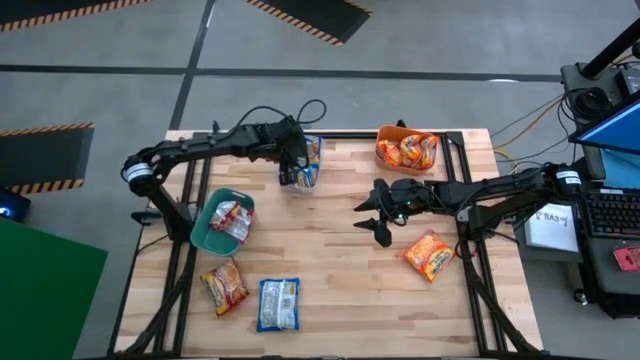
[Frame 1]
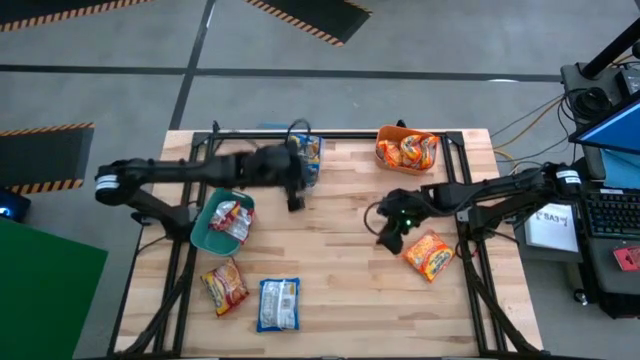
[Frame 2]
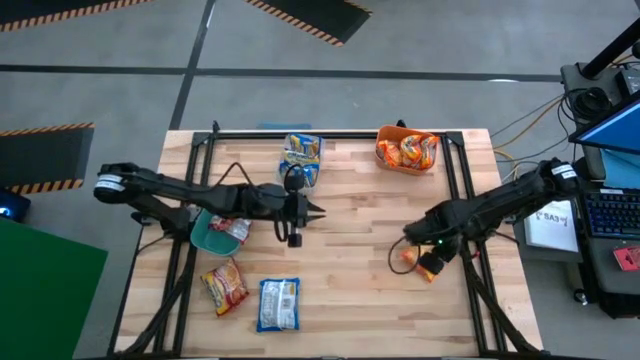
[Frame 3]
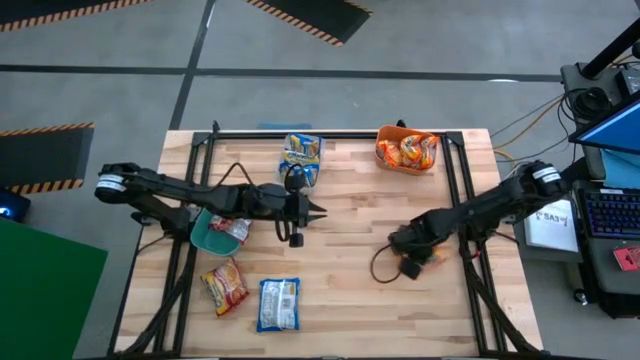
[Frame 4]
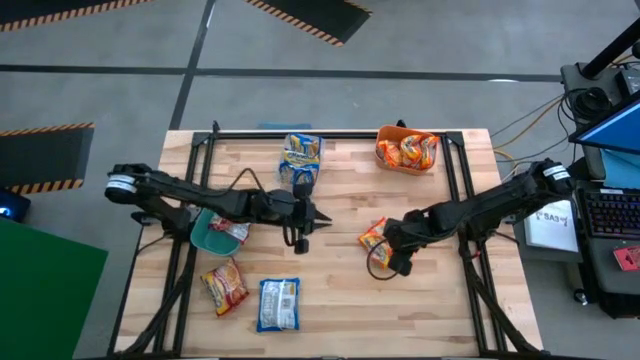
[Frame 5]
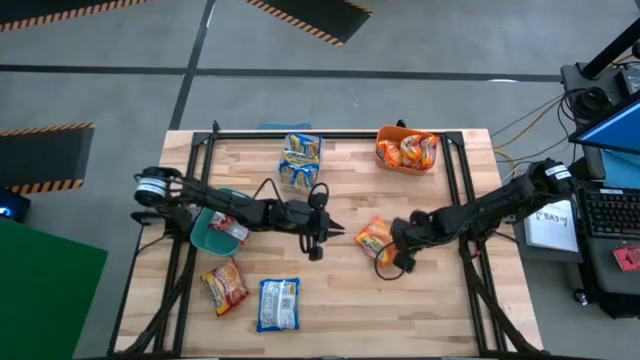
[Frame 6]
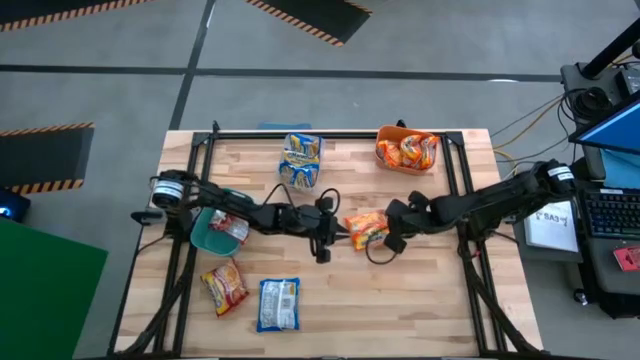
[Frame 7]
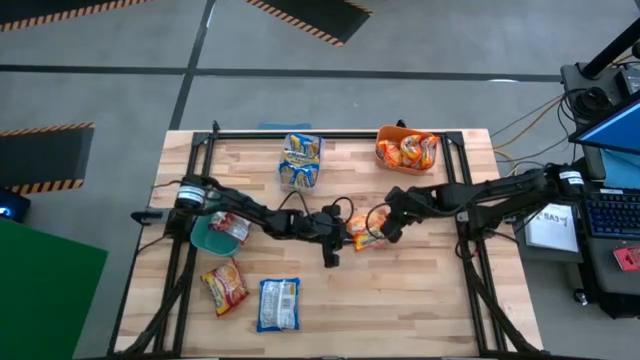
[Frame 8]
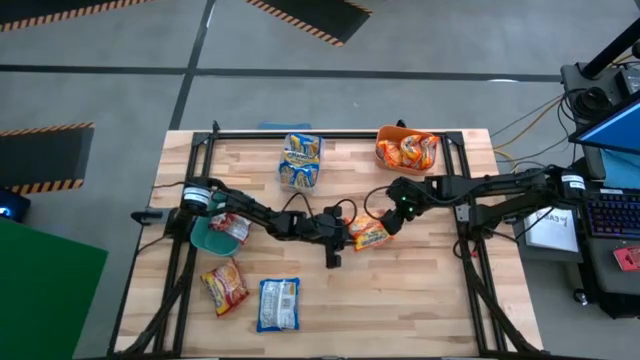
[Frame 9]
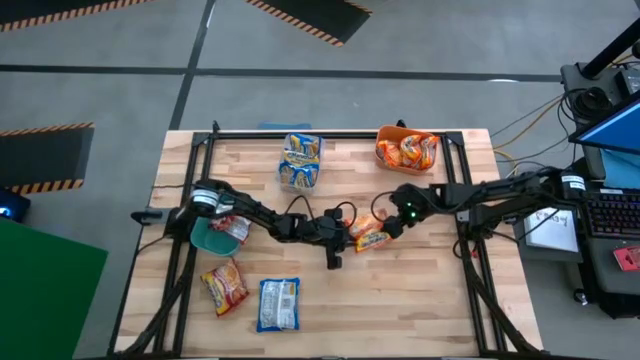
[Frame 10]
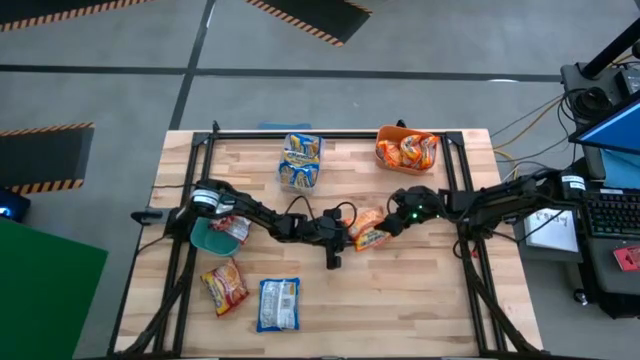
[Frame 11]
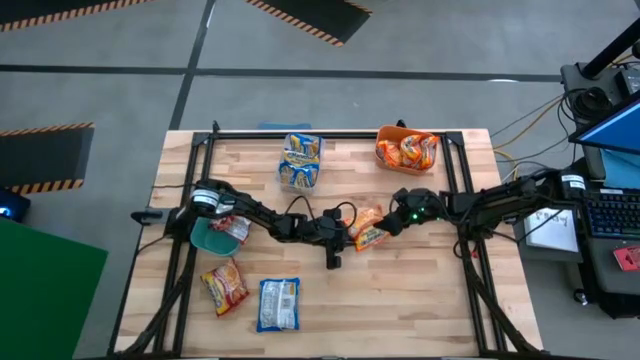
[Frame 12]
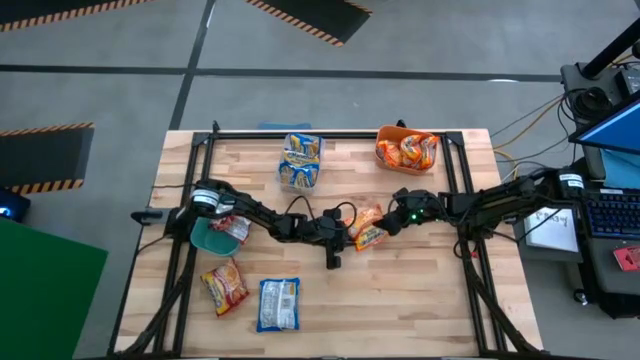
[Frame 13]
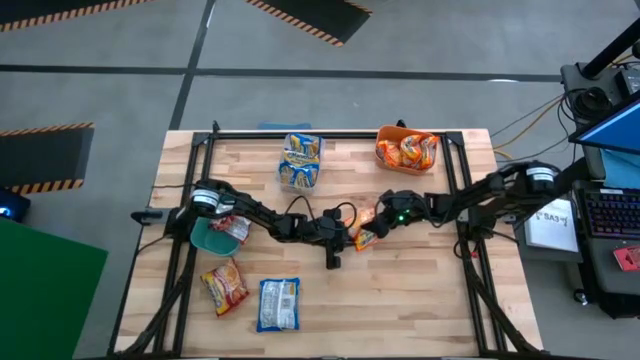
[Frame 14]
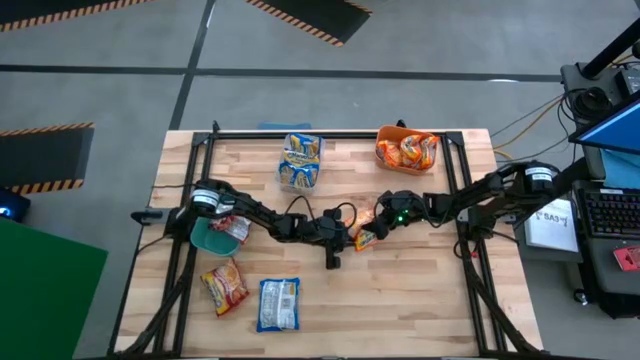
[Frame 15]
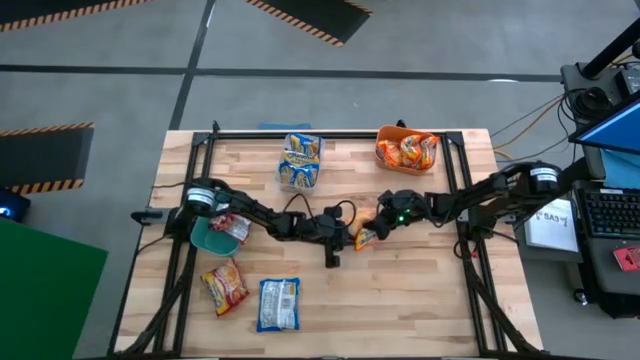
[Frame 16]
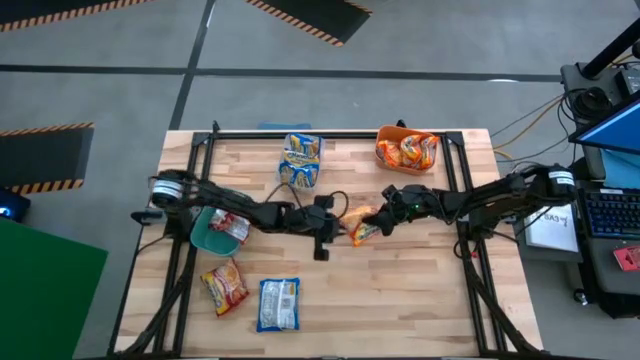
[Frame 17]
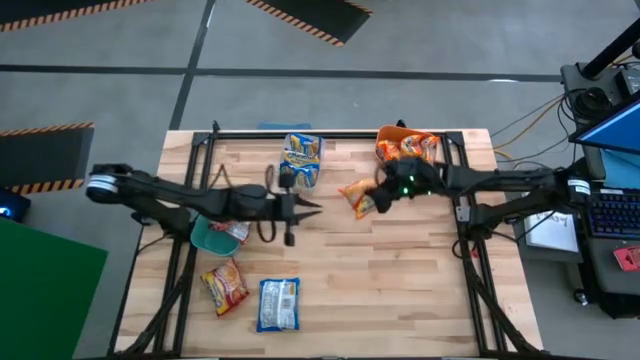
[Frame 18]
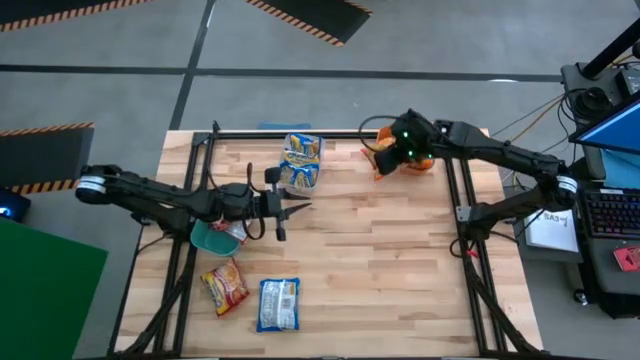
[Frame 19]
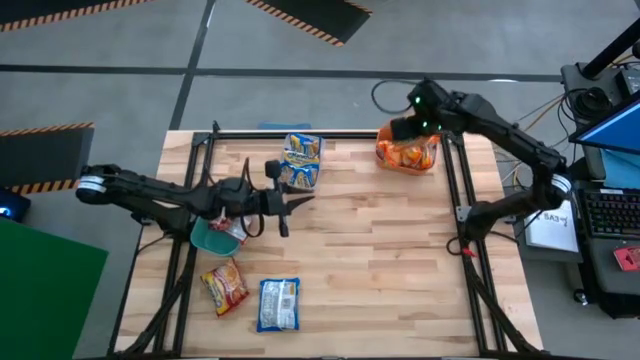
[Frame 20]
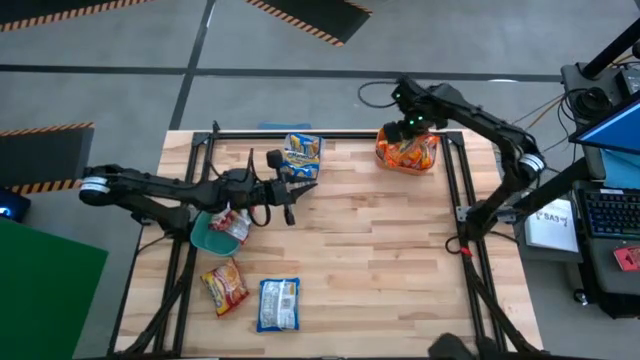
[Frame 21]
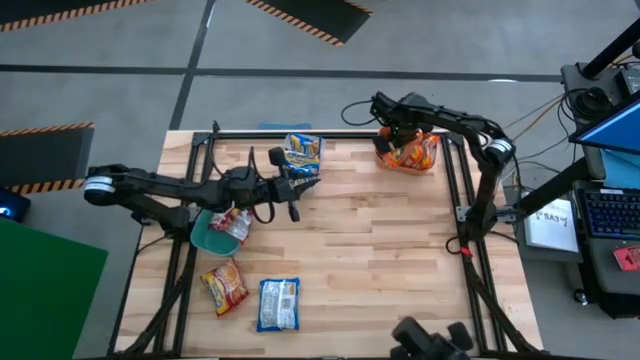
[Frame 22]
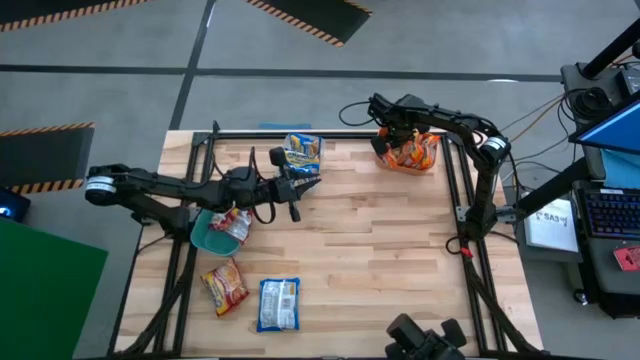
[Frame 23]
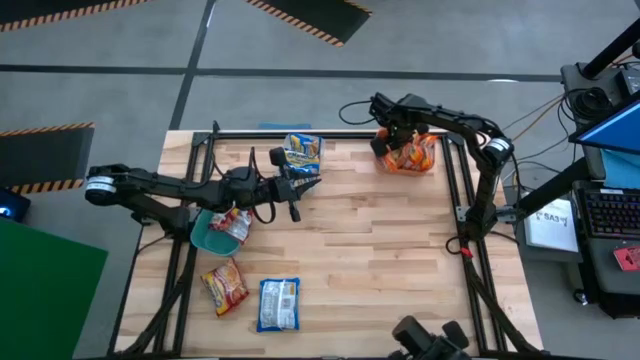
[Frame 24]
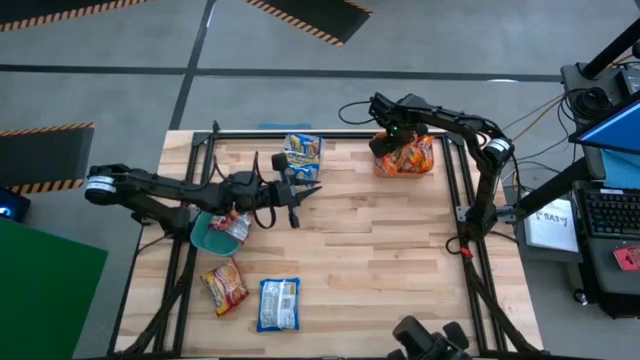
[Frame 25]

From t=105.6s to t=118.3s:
Task: Sort Maruchan noodles
Put the orange noodle pack into the orange bin

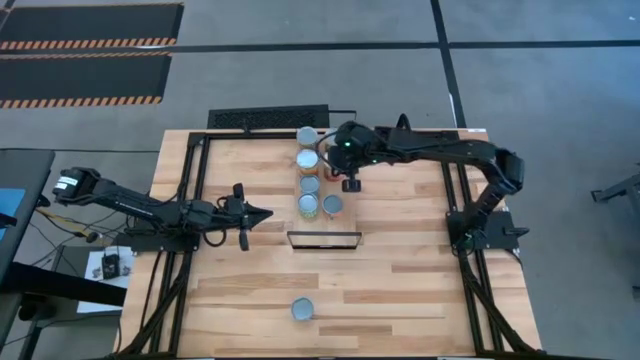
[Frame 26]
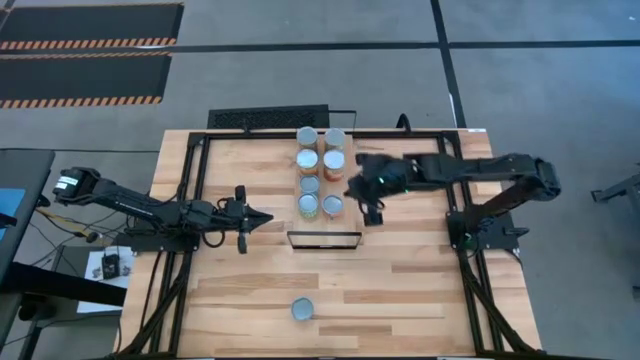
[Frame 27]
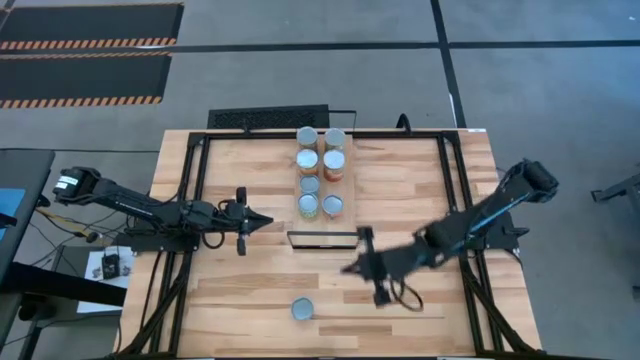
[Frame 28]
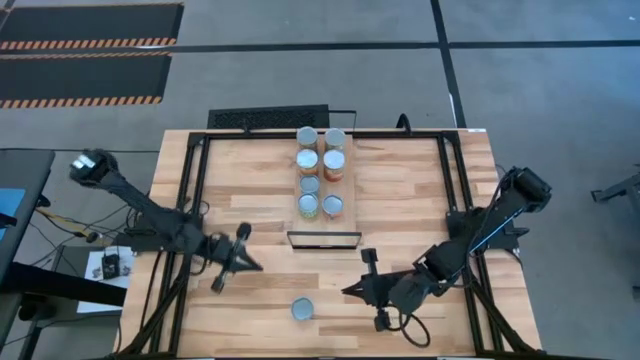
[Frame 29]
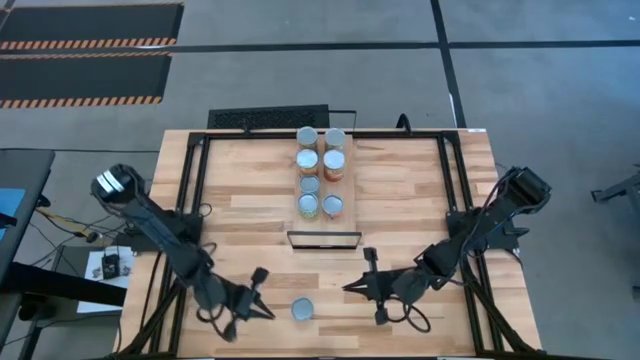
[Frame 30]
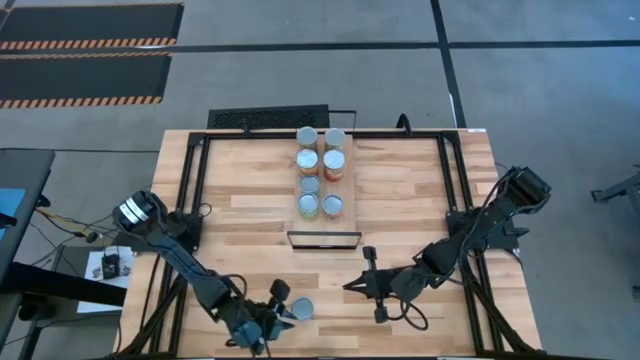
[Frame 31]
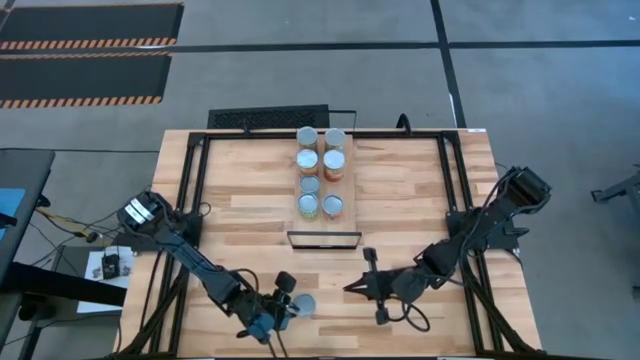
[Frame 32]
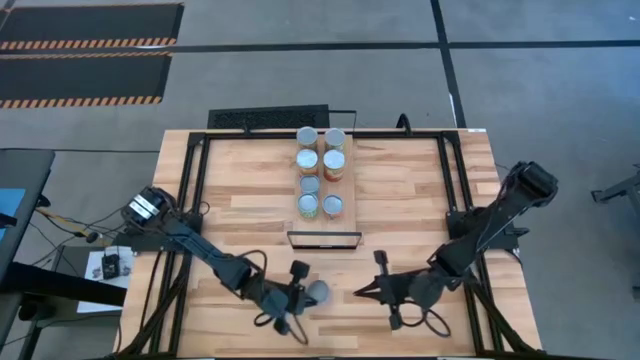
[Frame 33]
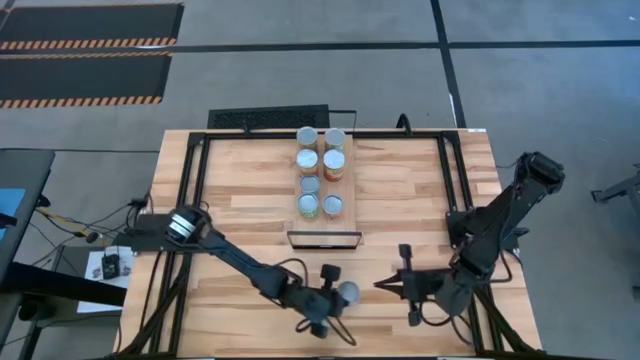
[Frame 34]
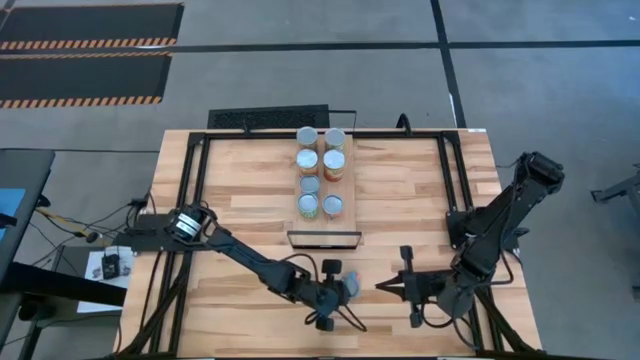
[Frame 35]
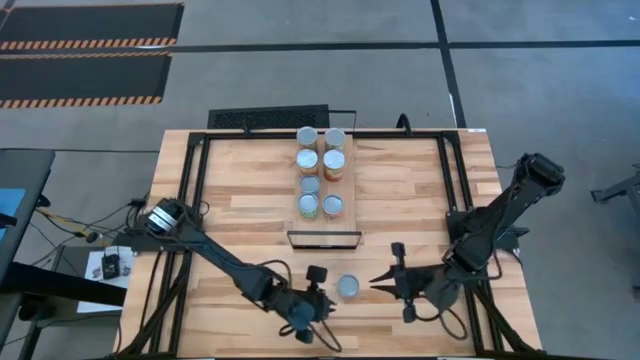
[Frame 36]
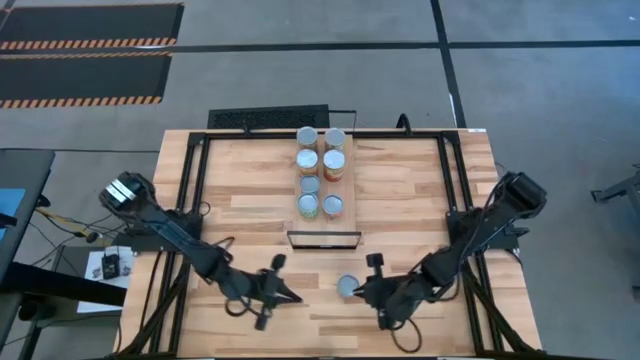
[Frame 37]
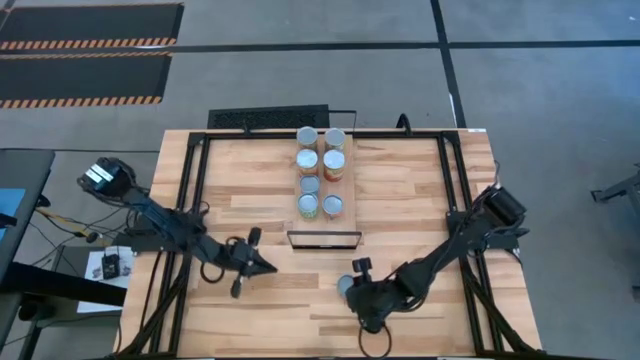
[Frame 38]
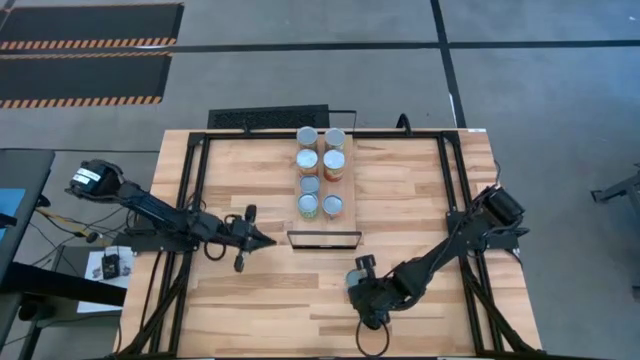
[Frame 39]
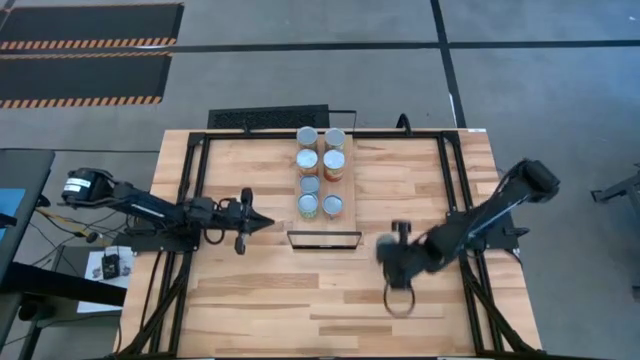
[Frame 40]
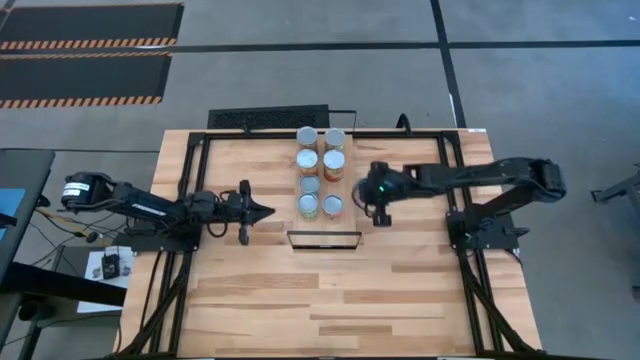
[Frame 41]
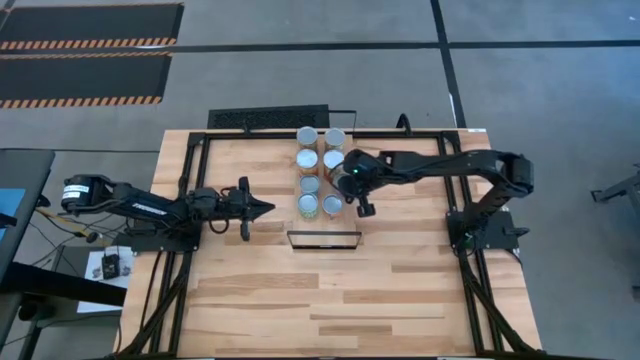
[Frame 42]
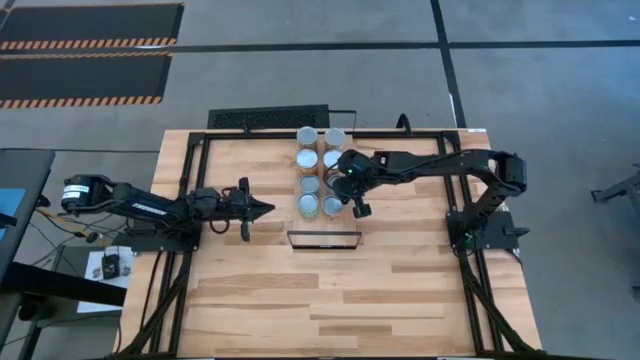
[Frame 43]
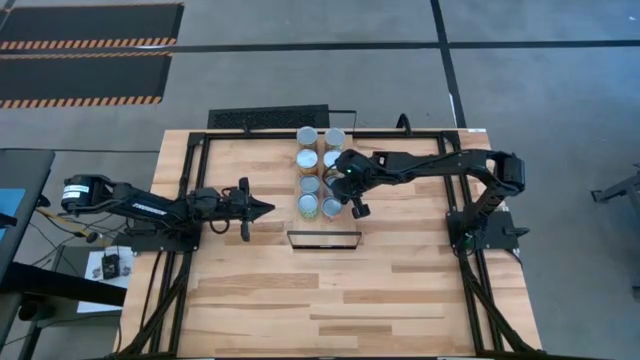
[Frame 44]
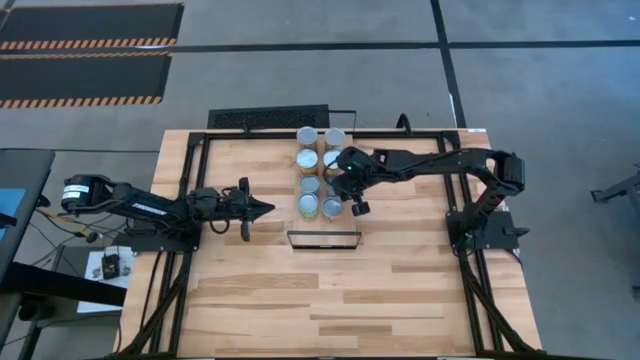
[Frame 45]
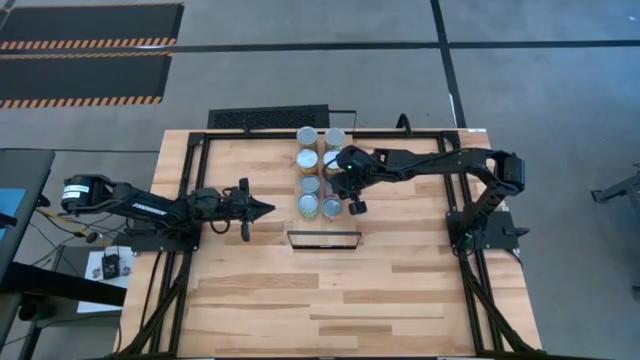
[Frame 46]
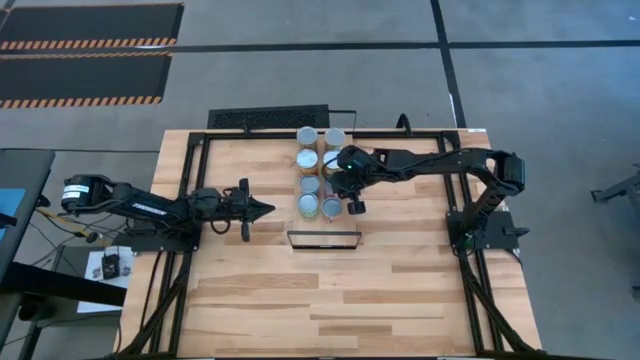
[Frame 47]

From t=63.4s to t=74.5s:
Task: Pick and place cans onto a shelf
Put the blue canned corn on the shelf
